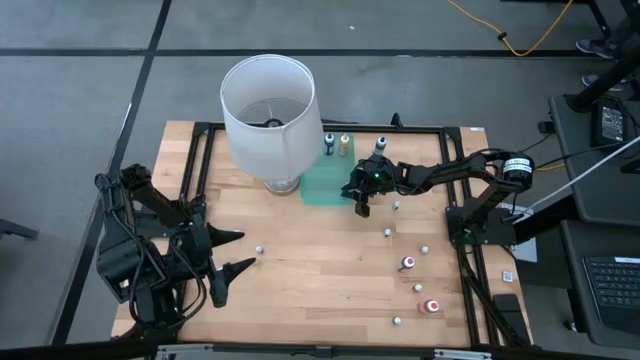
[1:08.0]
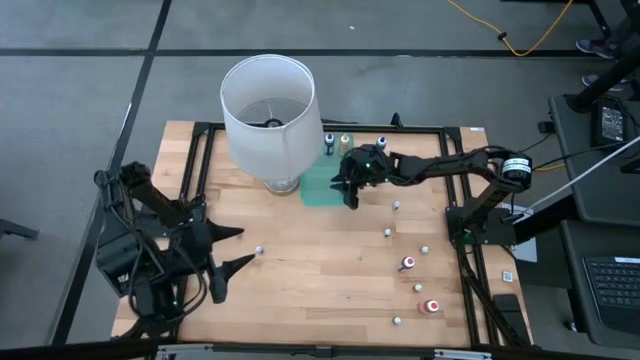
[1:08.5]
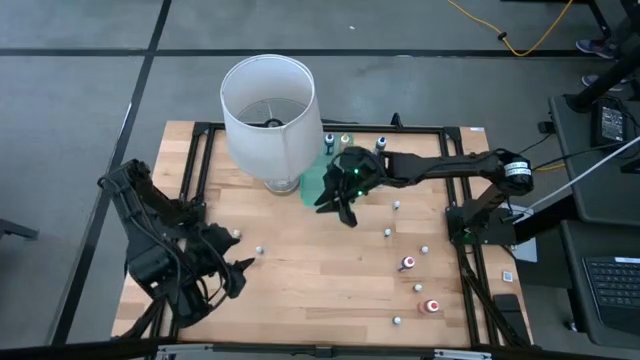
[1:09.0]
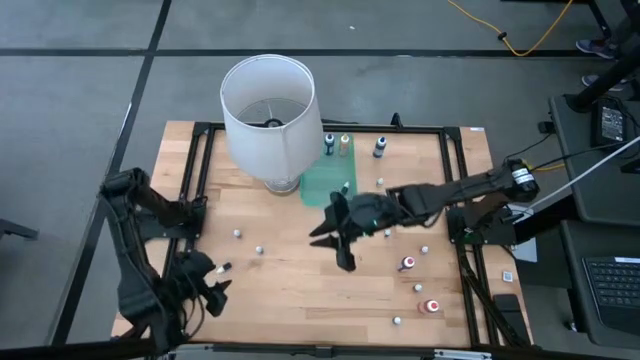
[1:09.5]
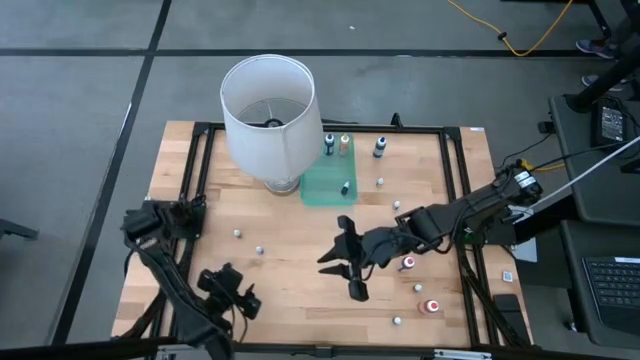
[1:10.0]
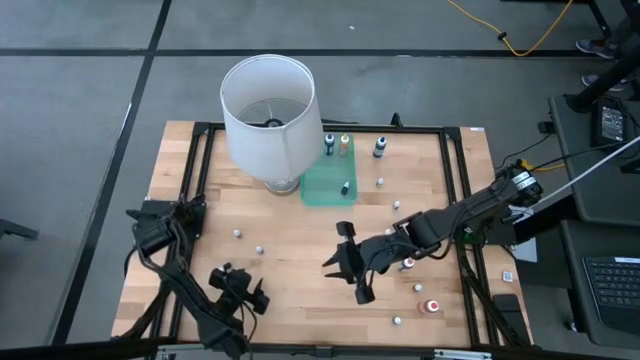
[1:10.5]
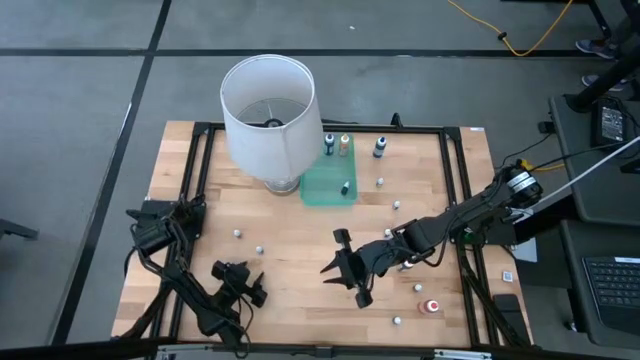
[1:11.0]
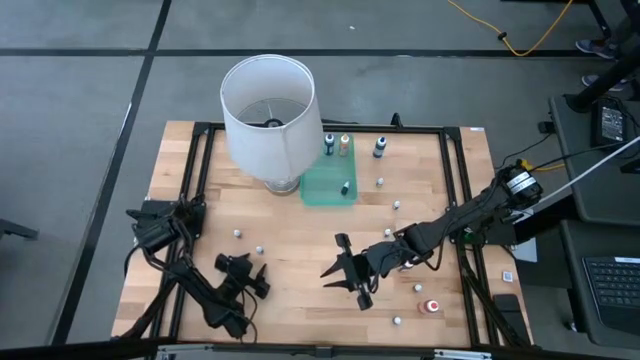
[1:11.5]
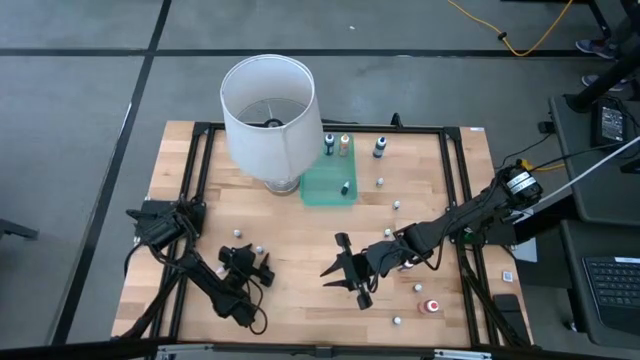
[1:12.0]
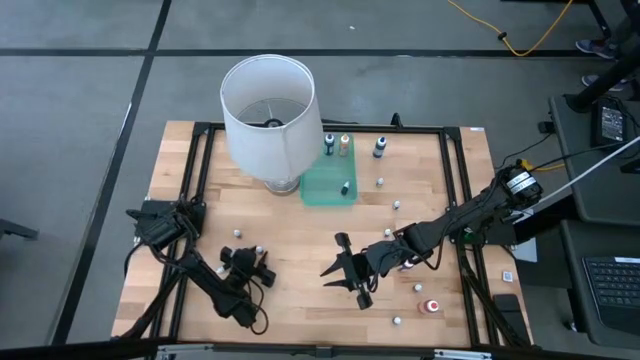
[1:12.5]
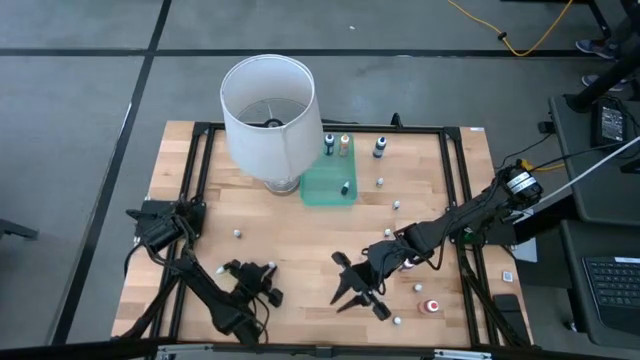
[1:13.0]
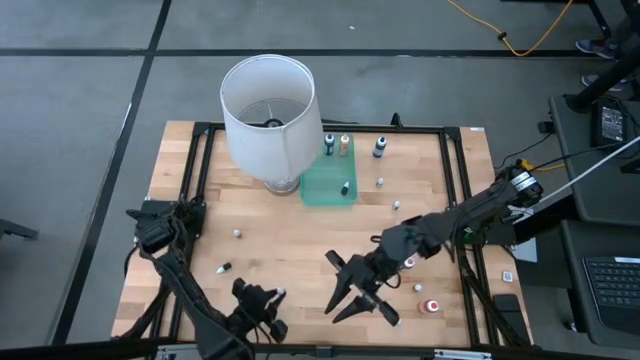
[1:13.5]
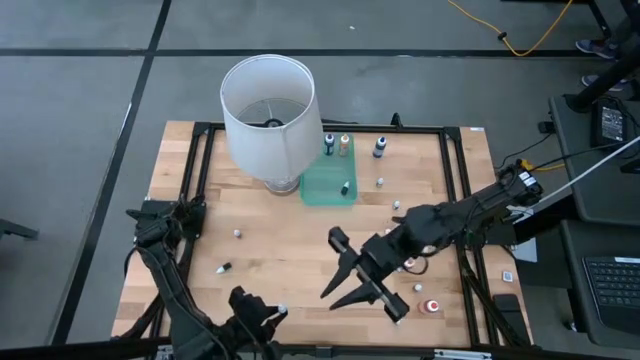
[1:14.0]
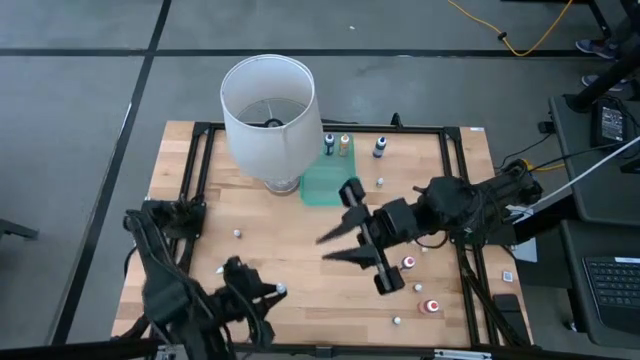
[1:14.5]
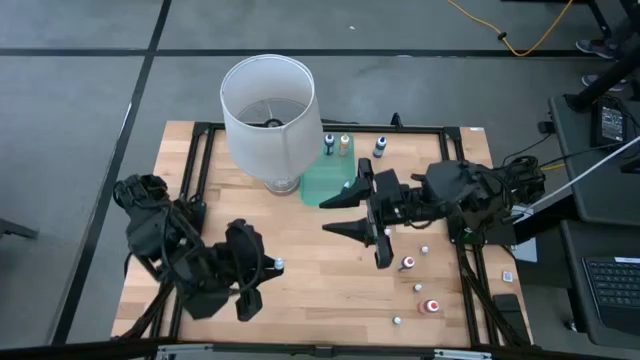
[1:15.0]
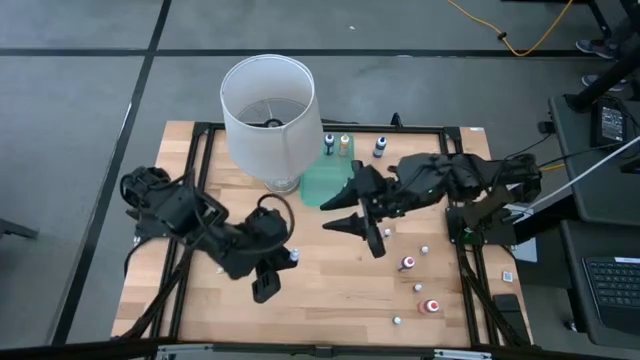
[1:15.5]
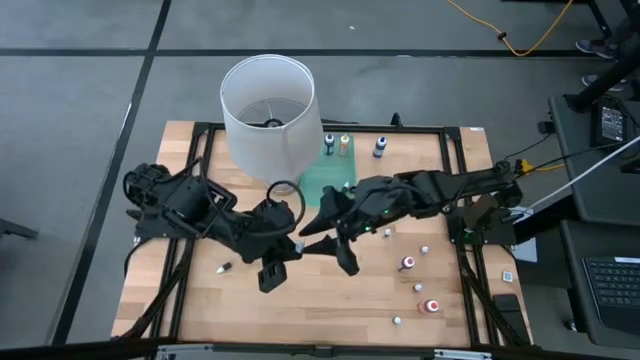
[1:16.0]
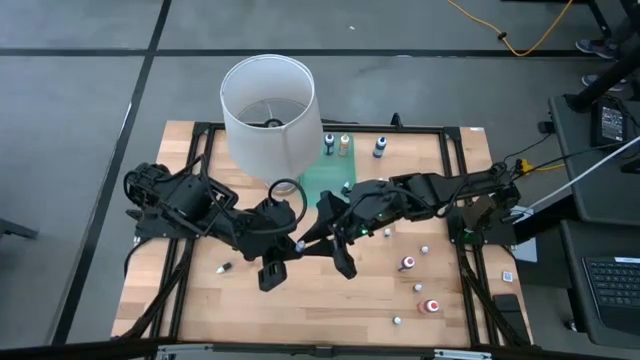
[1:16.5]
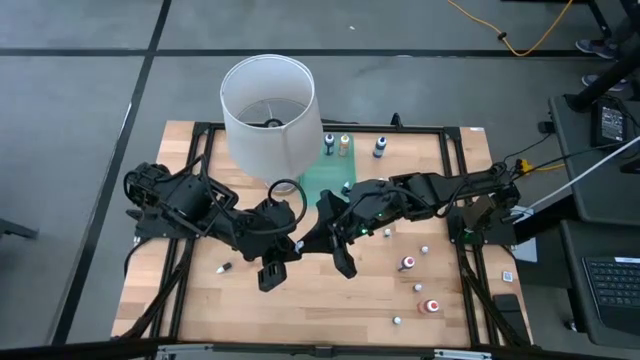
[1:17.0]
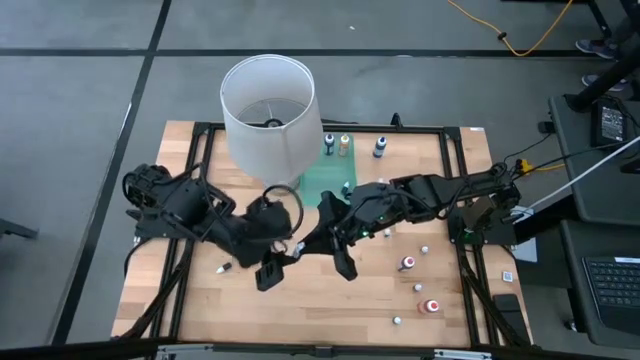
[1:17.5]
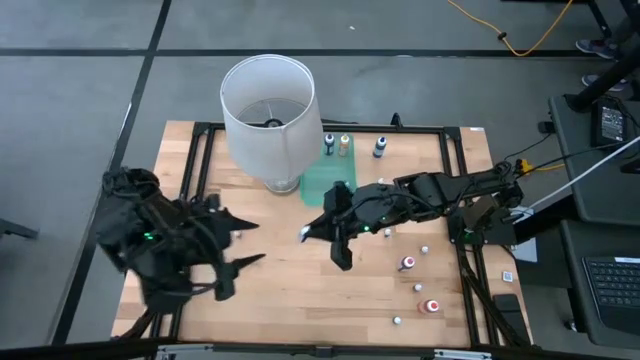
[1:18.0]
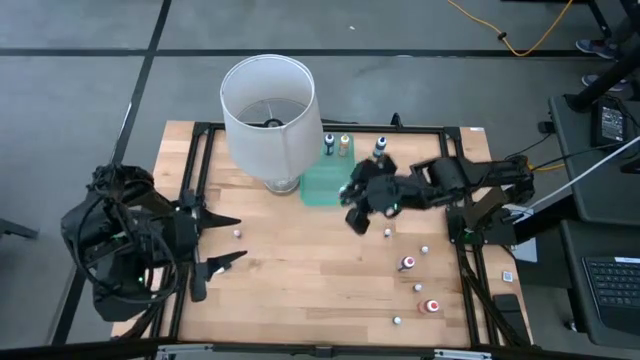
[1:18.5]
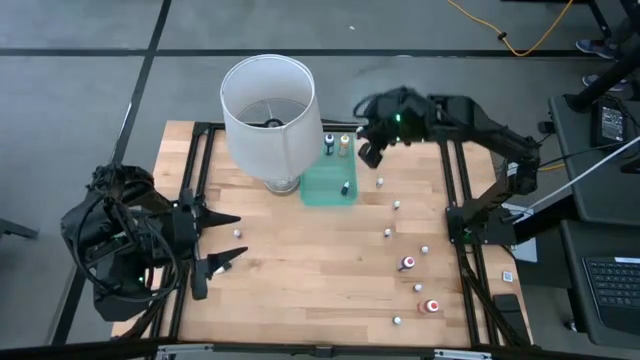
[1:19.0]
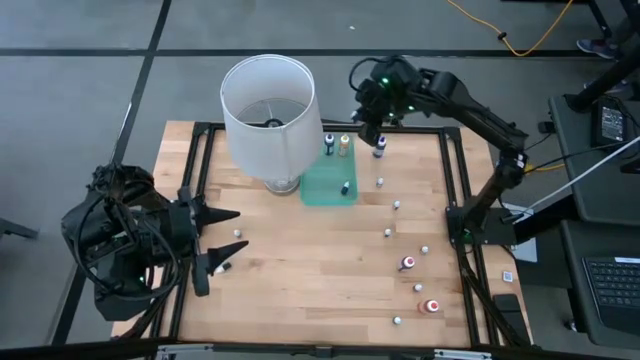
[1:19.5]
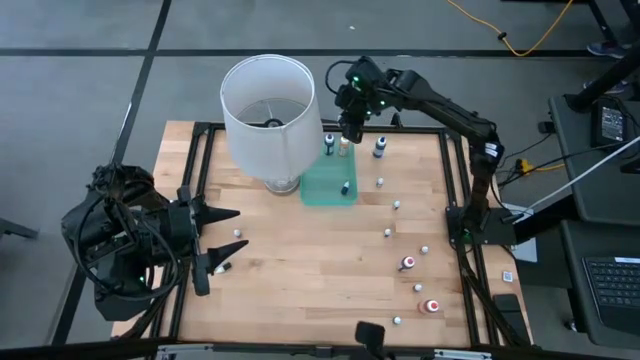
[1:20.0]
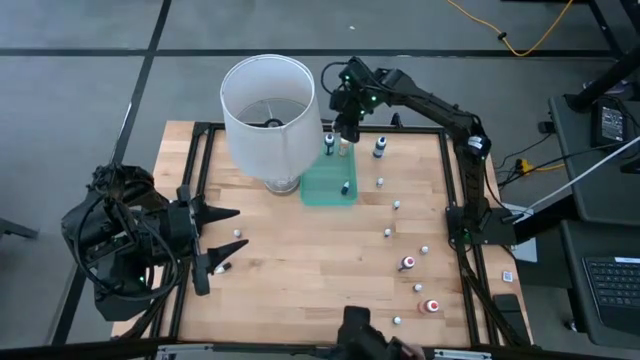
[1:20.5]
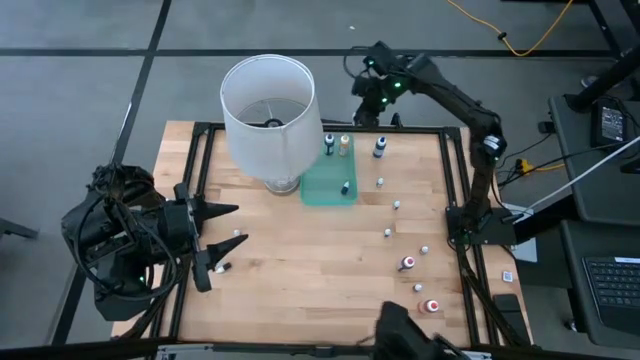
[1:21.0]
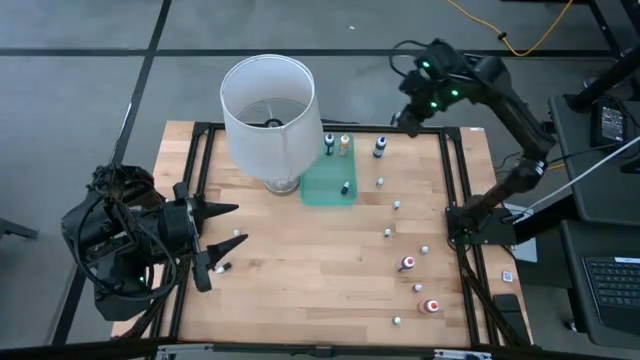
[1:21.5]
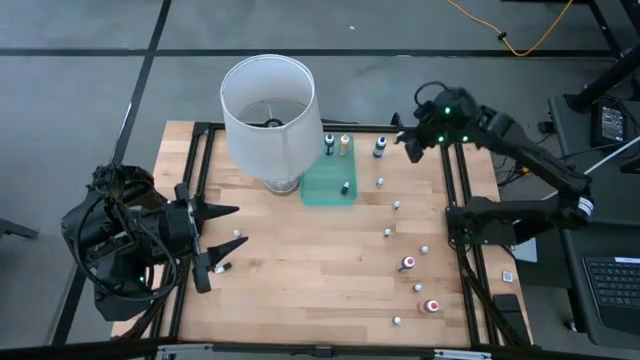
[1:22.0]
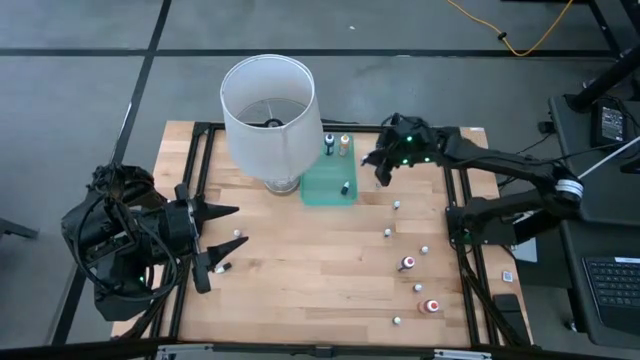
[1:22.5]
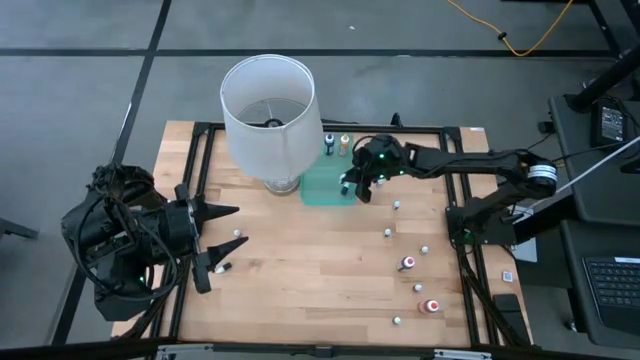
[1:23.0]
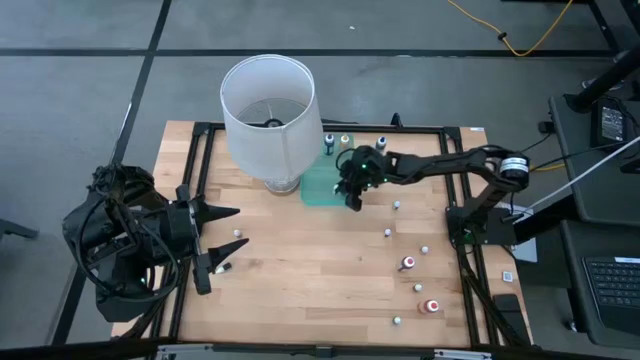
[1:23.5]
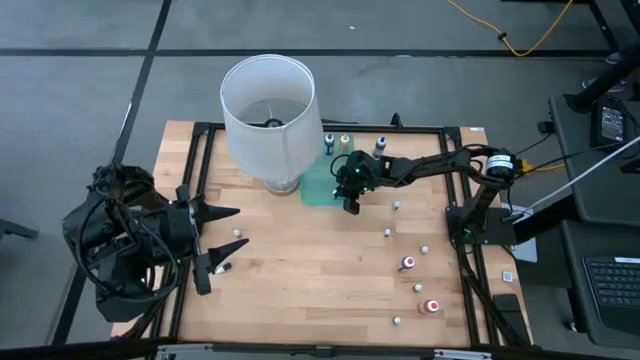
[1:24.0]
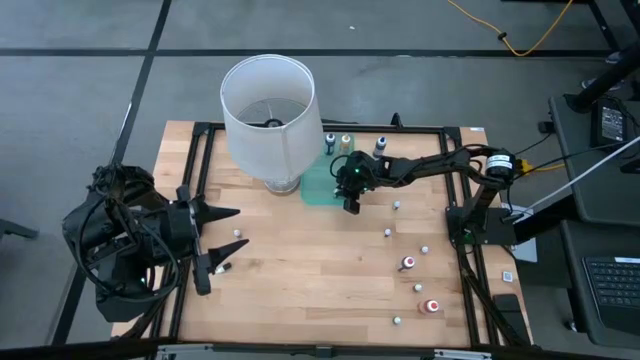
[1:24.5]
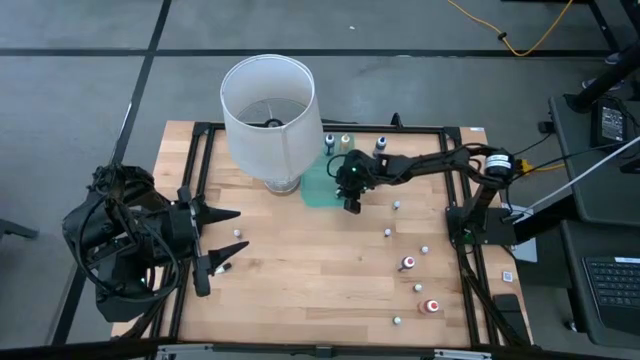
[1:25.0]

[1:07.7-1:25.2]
Task: Pick & Place food coloring
Put the small light blue food coloring bottle into the green bin

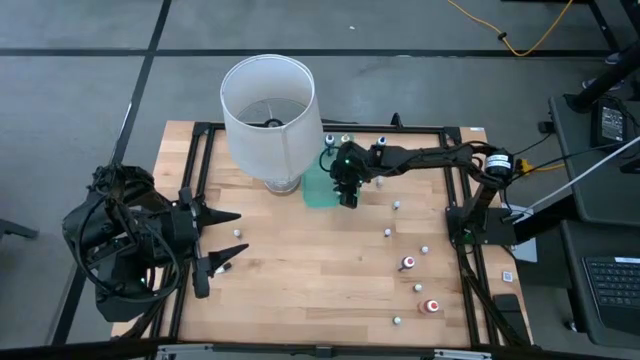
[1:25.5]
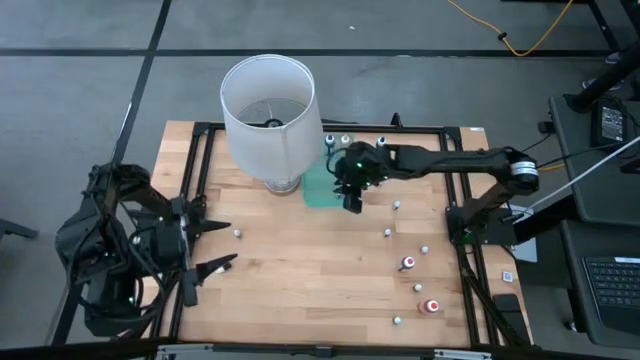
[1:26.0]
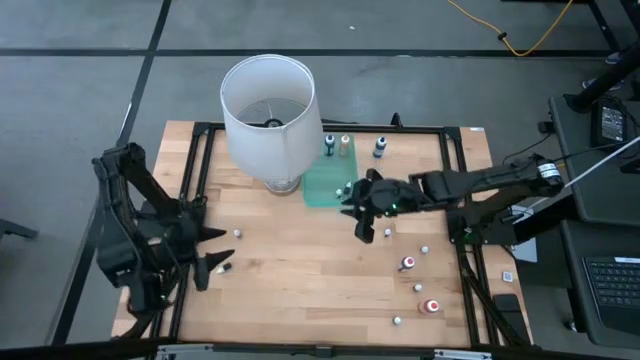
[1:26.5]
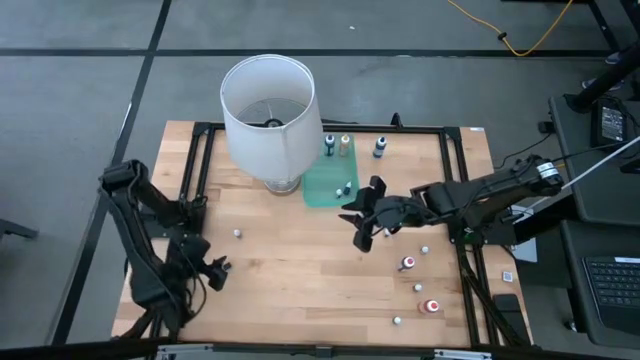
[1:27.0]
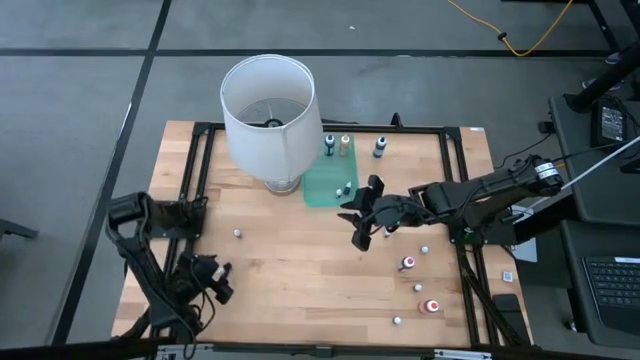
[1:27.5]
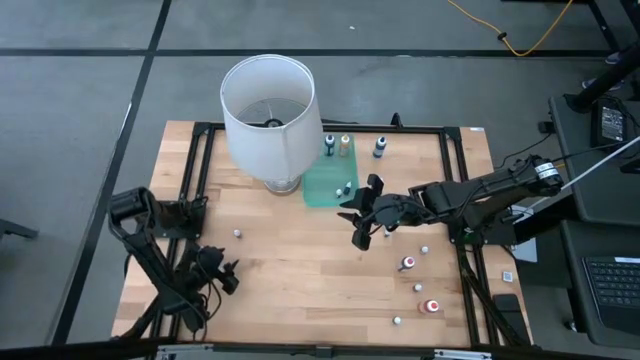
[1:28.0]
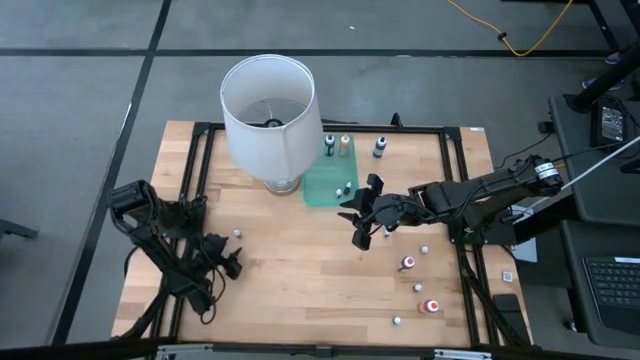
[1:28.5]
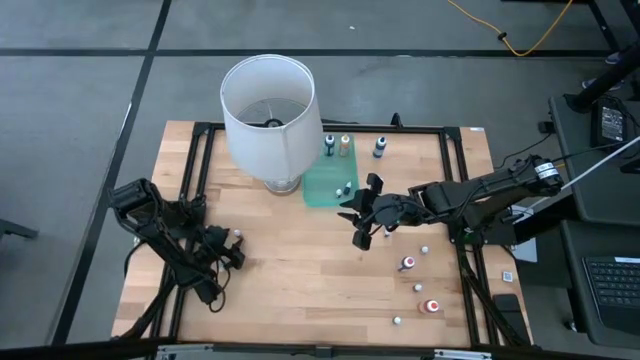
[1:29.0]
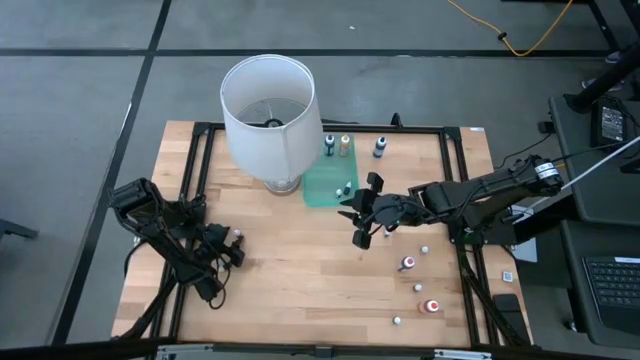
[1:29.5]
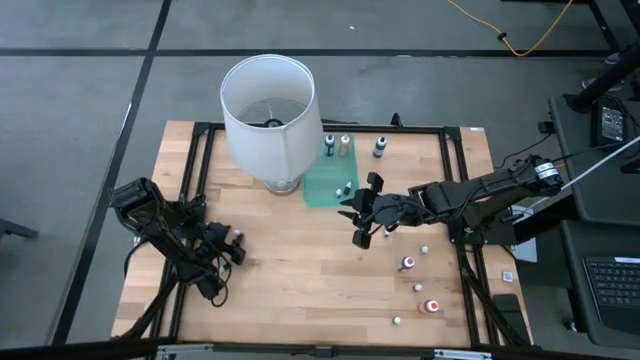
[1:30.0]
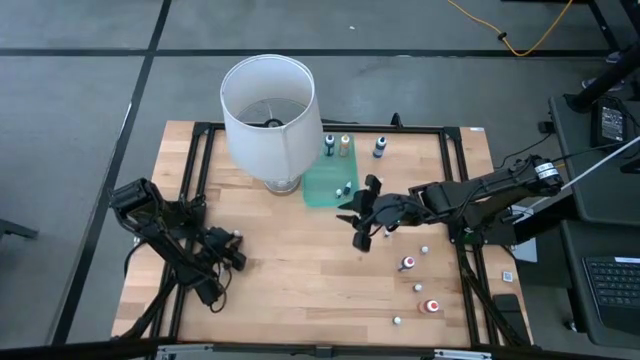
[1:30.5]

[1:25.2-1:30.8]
Put the top left small red food coloring bottle into the green bin
